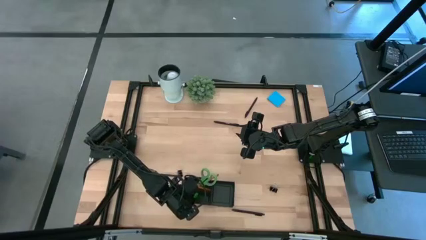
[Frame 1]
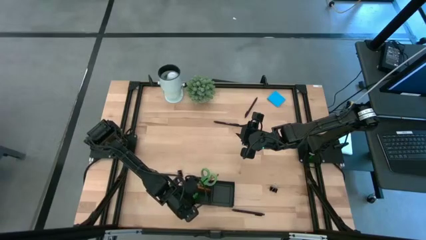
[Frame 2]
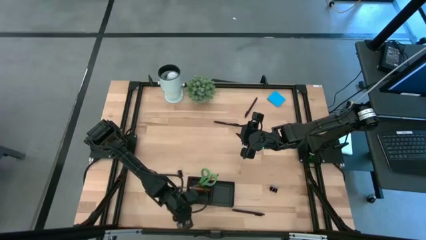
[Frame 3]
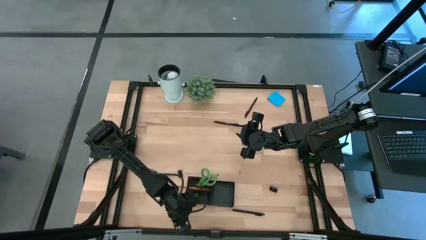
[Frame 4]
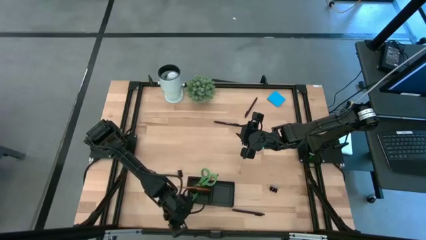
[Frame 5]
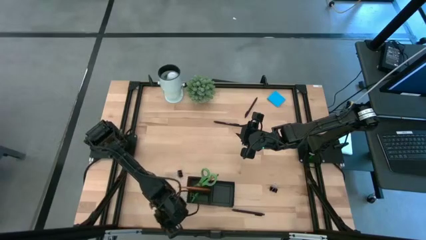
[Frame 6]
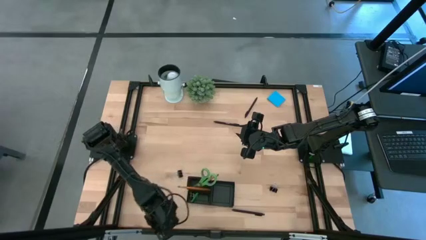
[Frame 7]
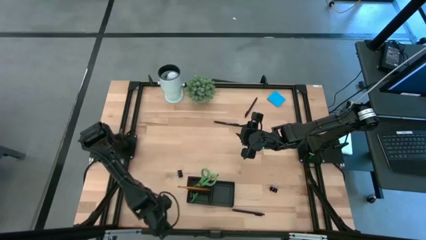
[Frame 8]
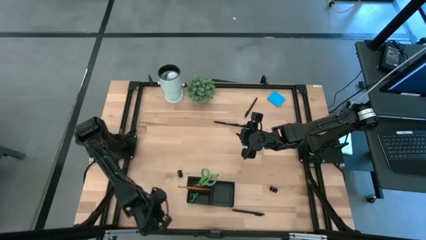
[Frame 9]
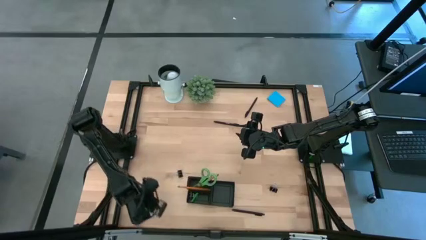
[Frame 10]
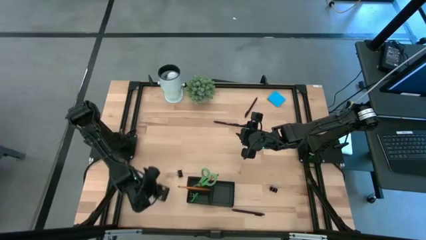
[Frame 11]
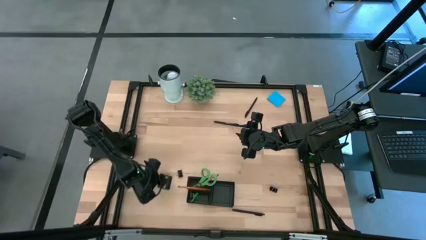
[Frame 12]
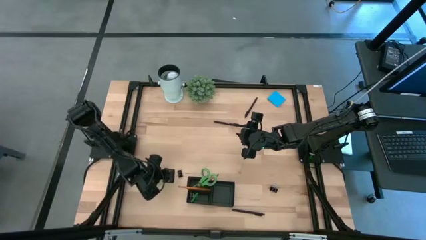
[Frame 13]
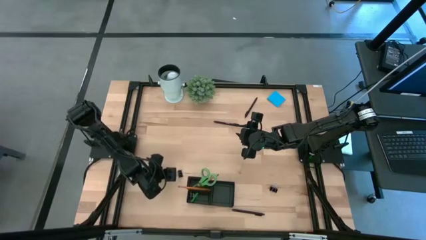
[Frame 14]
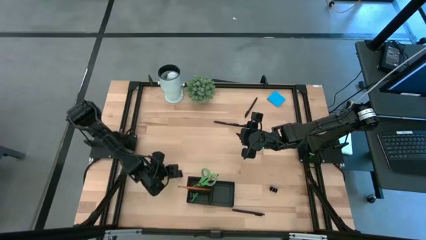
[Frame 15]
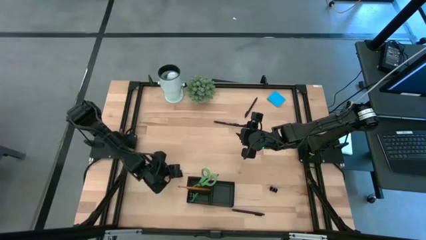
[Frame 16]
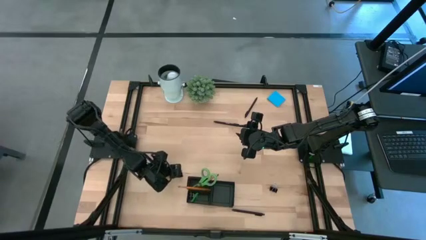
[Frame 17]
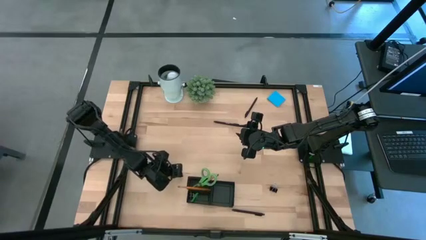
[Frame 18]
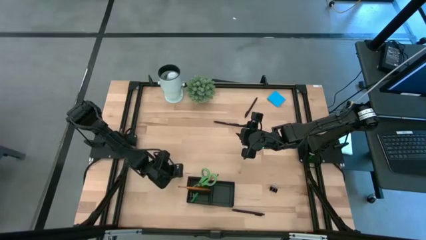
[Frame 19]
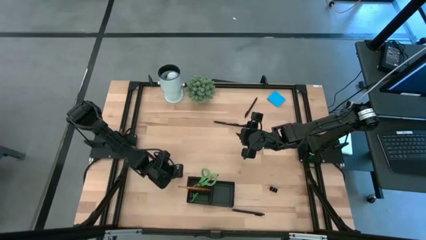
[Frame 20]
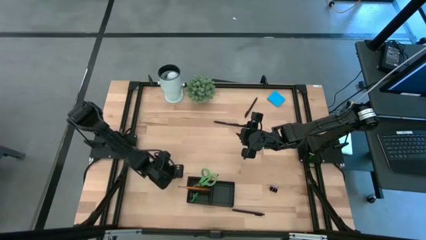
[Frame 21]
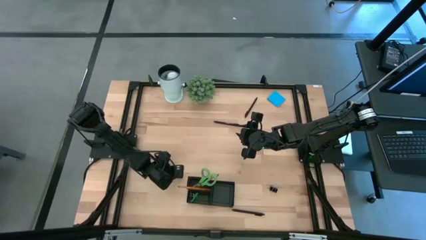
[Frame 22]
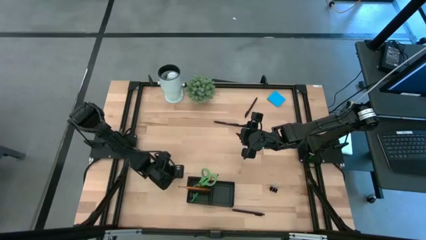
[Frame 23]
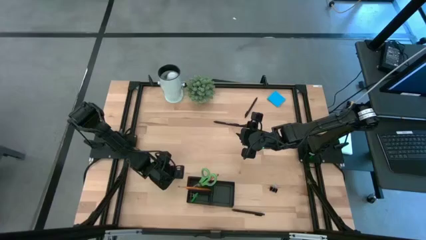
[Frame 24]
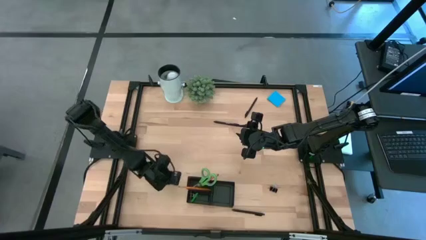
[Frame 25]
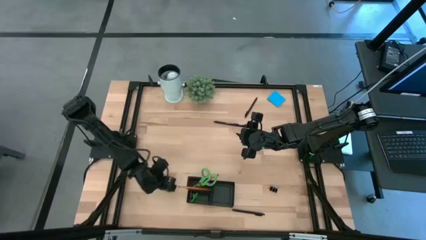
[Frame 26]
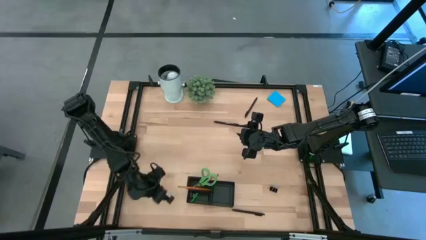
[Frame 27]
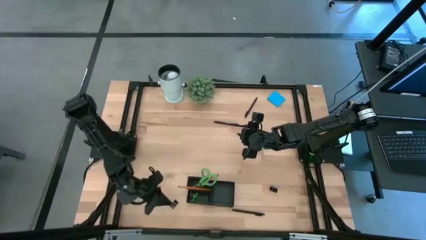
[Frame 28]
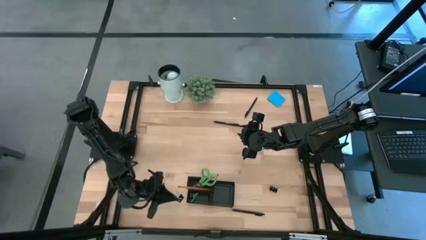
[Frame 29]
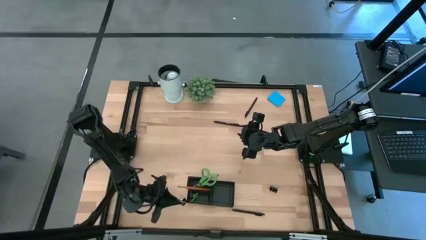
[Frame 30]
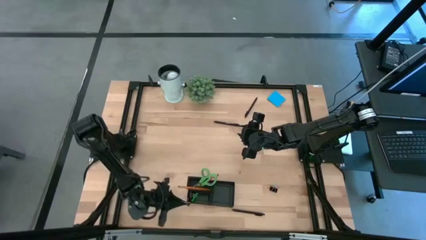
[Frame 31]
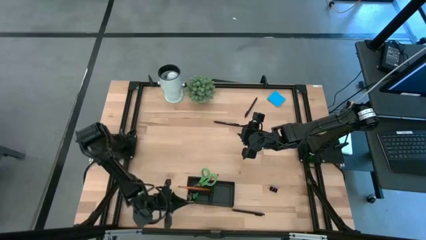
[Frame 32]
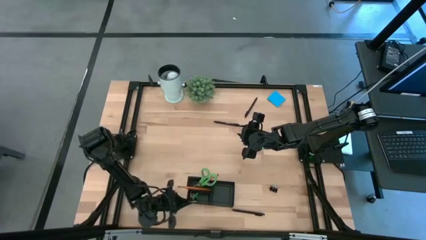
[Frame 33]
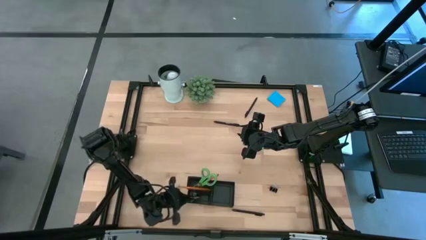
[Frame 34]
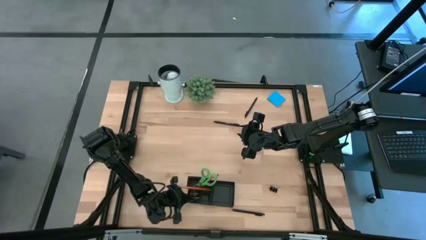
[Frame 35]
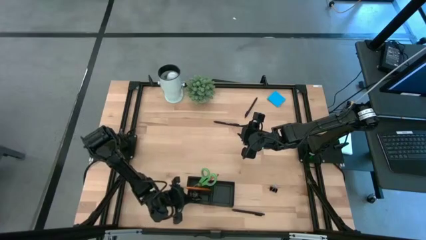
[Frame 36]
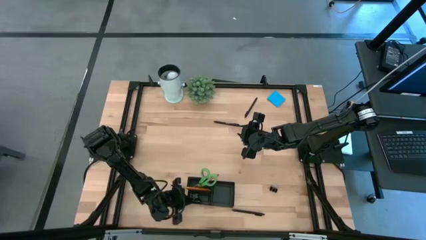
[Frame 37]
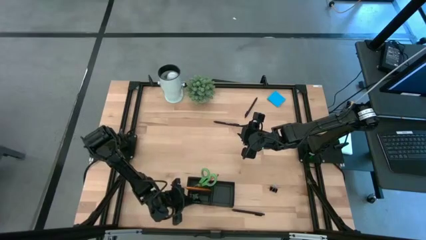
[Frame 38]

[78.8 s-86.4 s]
Task: Pick and place office supplies into organizer
Put the left black binder clip into the black desk organizer

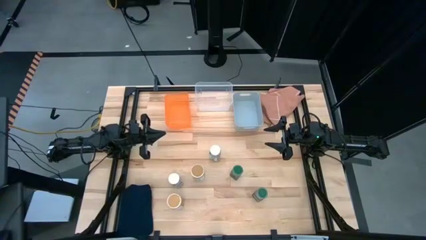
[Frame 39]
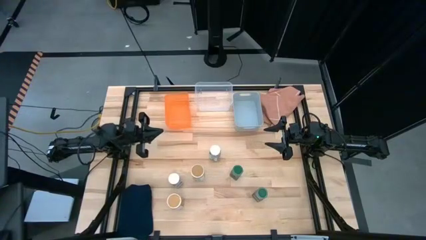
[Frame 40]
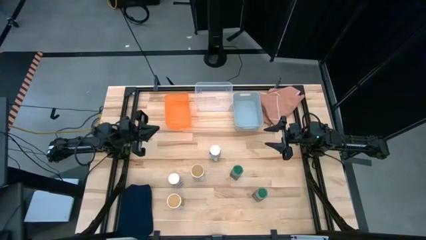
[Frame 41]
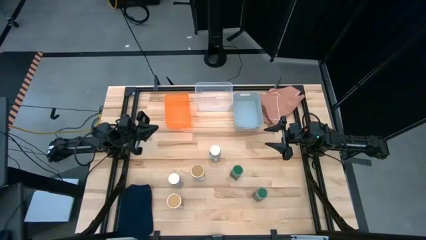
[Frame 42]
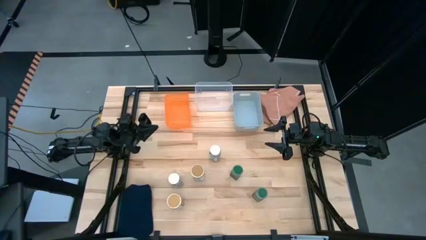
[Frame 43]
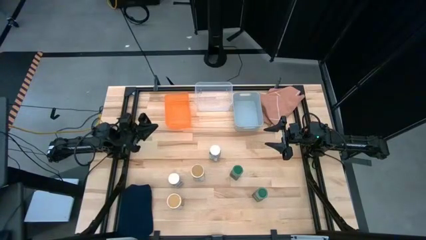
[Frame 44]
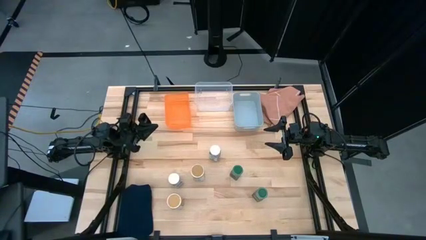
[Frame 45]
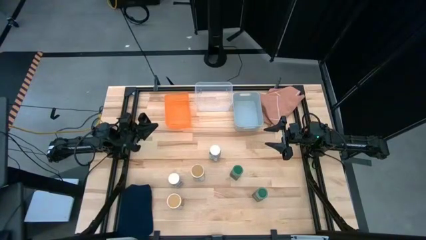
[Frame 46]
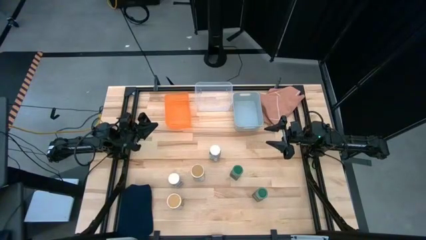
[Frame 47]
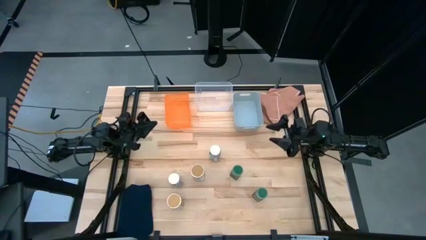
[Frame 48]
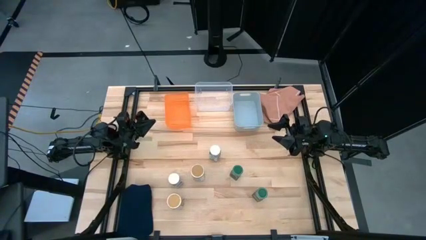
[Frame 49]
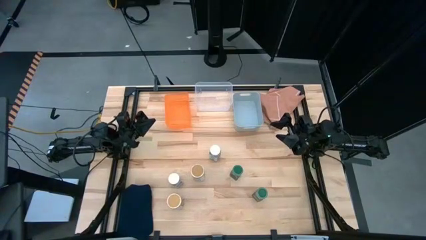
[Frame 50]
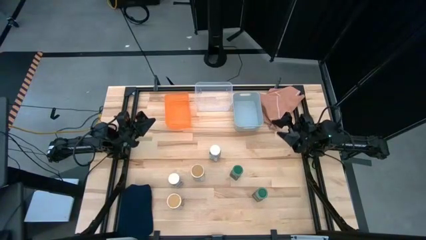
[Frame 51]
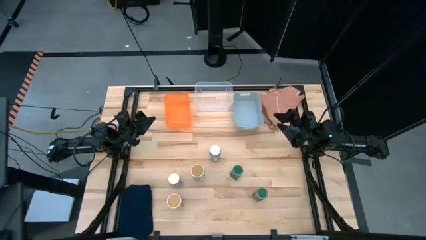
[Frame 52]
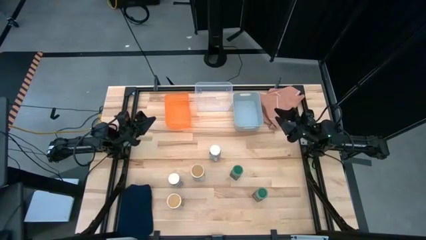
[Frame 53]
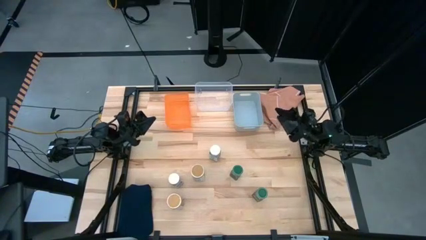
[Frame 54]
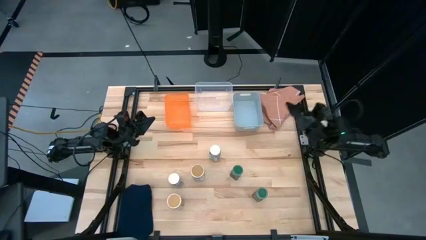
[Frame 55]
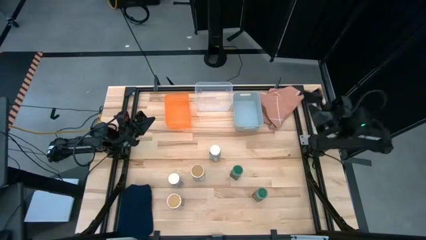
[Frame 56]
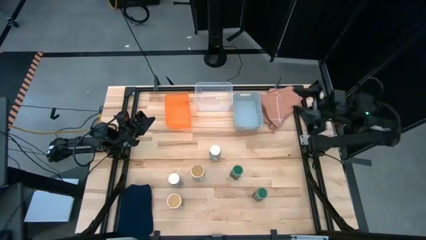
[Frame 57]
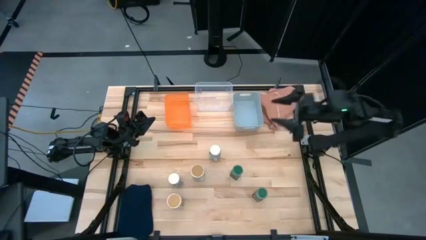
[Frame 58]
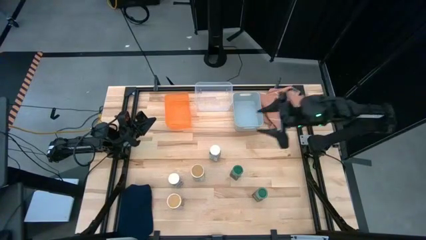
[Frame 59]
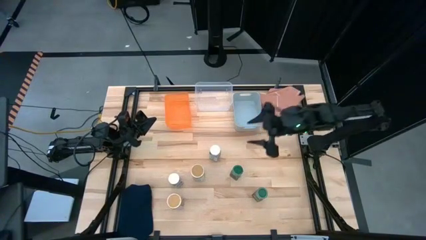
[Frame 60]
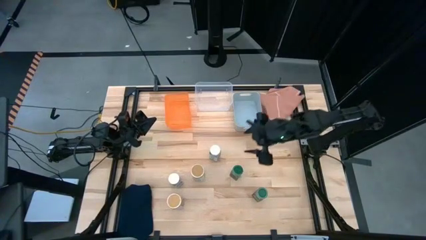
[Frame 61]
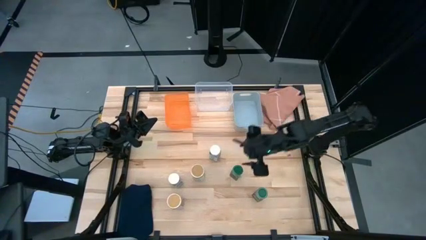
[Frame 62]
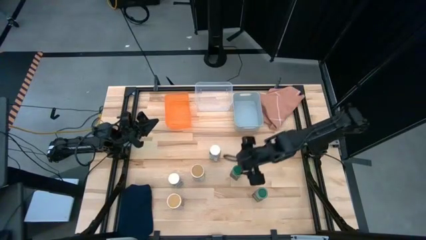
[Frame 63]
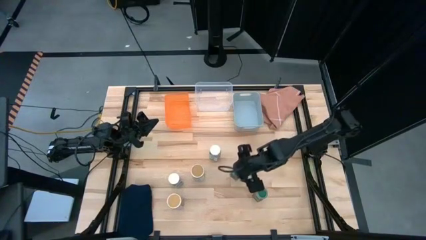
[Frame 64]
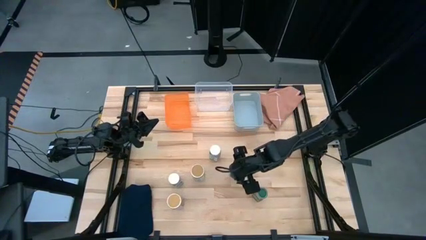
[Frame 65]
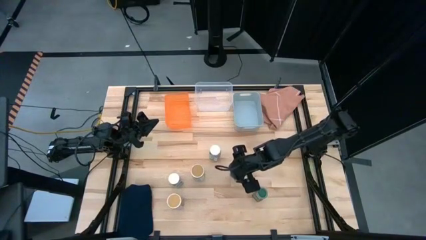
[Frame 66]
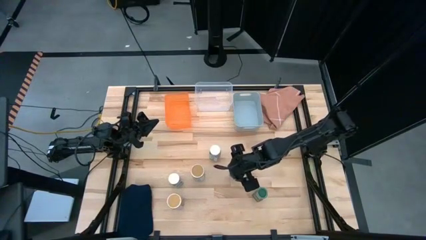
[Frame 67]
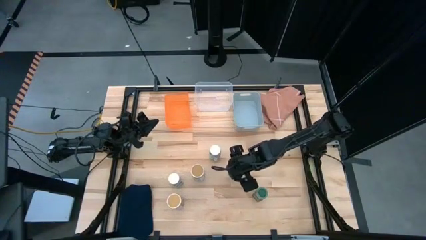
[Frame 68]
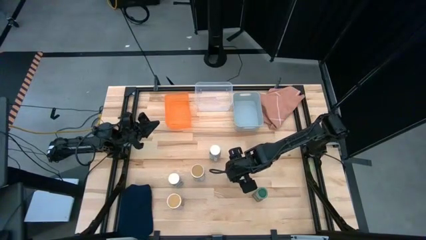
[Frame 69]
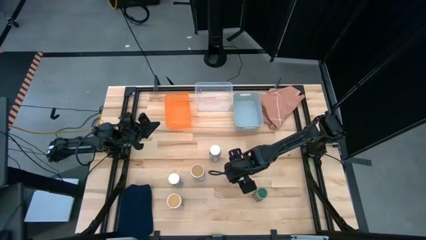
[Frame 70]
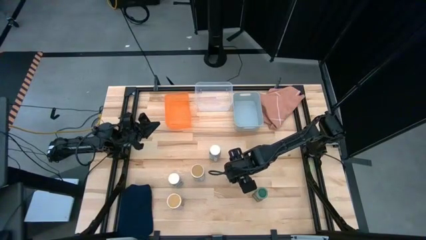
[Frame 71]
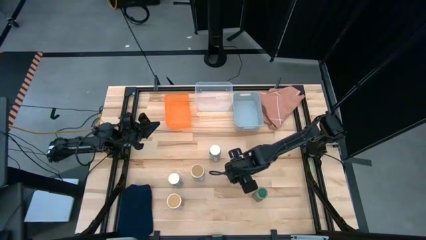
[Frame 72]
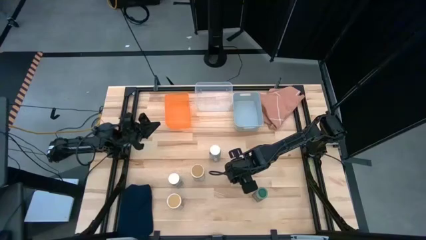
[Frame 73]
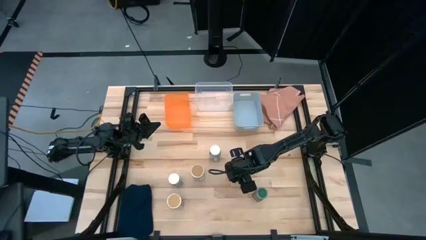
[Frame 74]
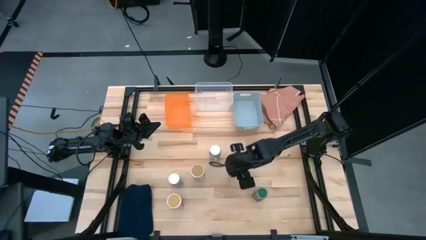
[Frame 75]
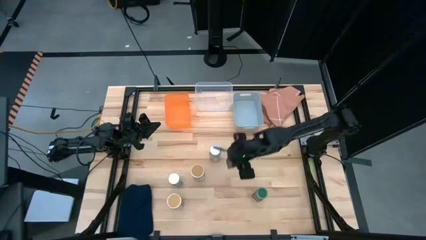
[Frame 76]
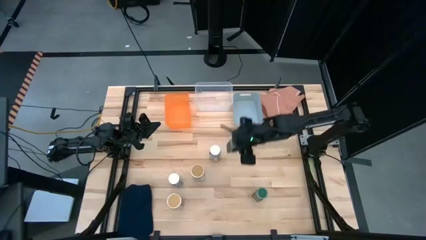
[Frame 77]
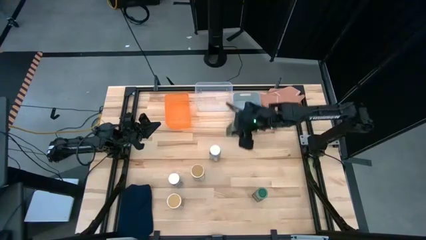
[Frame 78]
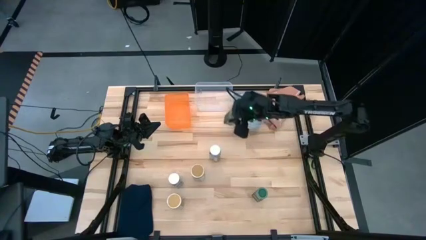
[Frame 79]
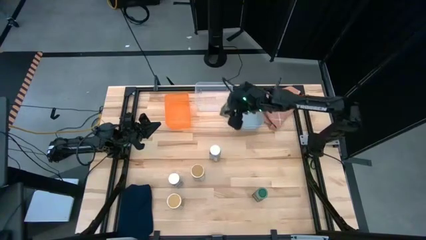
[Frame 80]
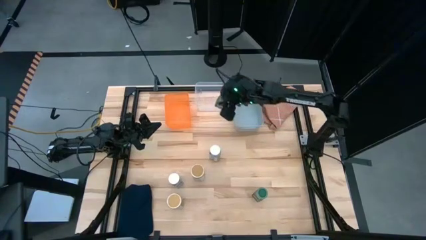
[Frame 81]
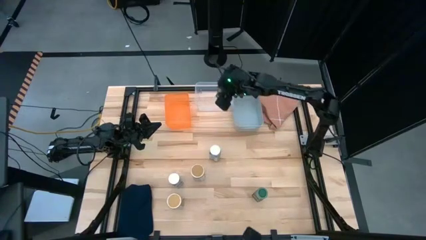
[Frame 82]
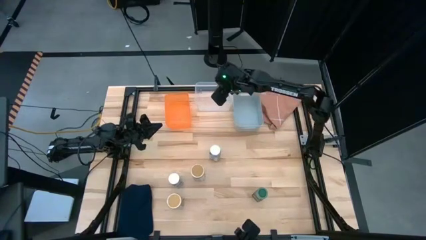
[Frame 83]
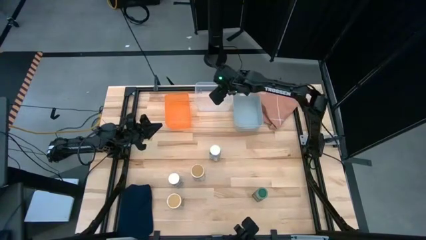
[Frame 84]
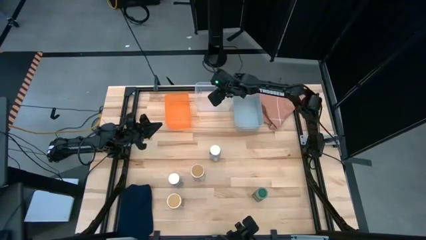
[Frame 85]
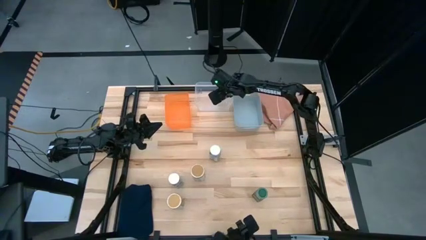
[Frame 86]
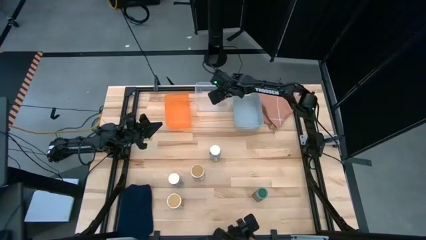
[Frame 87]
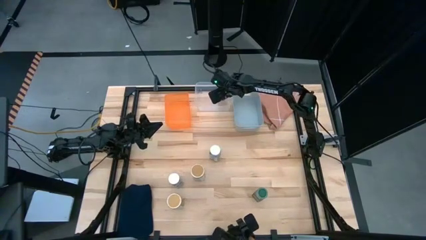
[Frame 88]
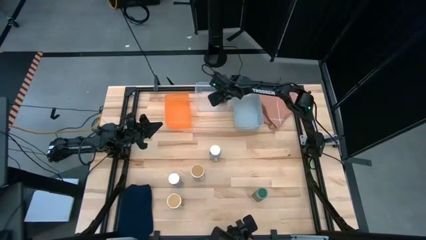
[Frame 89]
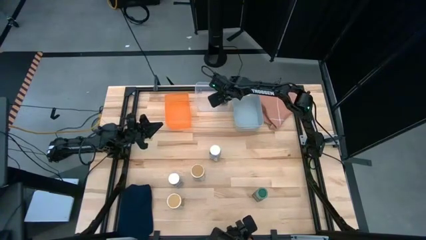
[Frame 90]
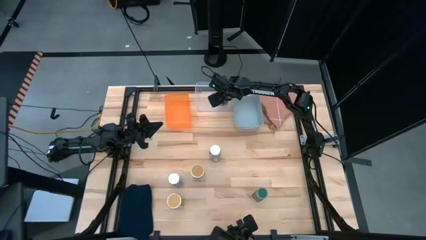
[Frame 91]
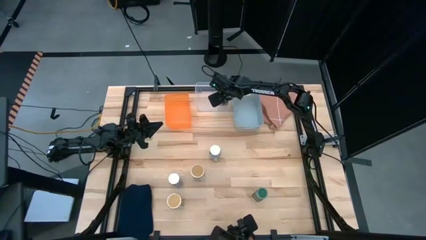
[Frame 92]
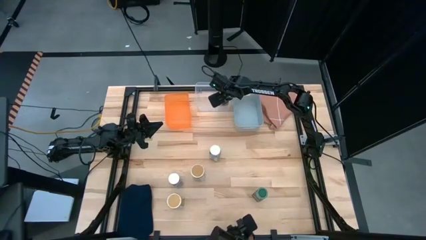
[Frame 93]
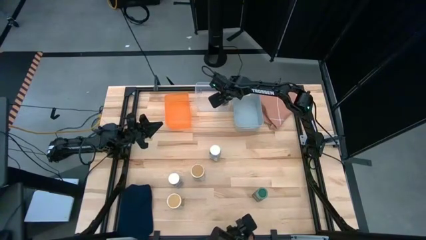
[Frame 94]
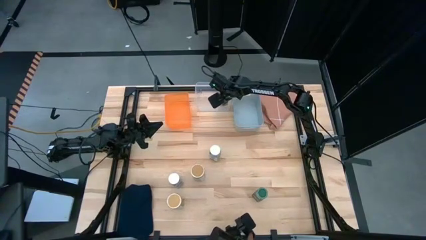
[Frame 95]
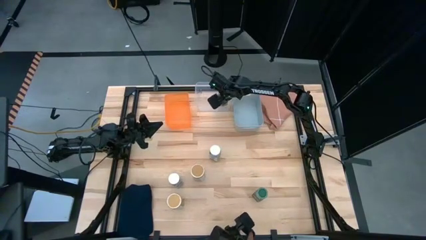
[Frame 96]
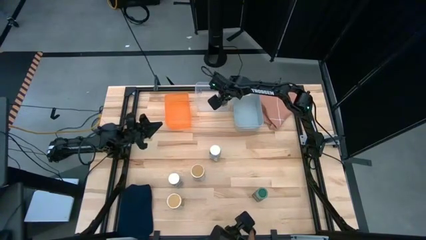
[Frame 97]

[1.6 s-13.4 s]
Task: Sort spices by type
Put the top green seasoning bottle into the transparent bin
